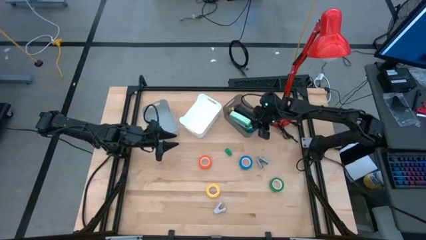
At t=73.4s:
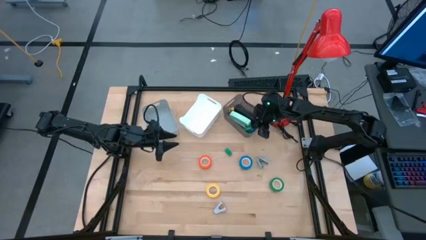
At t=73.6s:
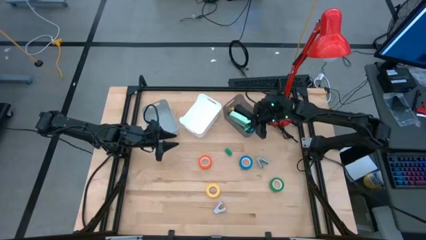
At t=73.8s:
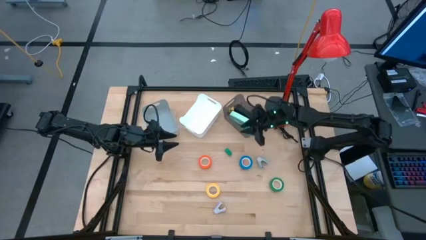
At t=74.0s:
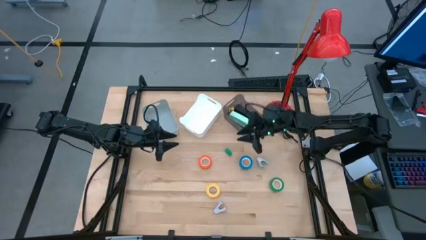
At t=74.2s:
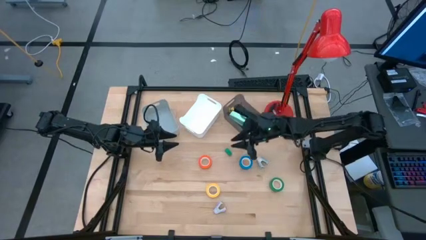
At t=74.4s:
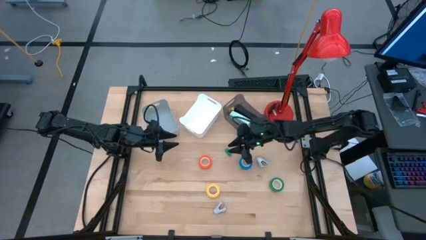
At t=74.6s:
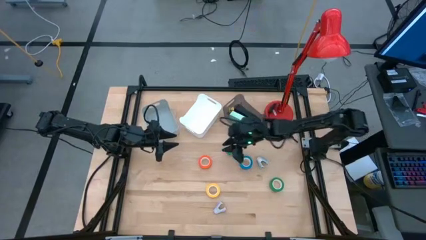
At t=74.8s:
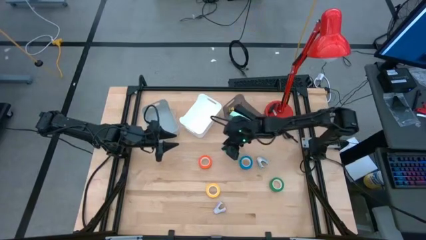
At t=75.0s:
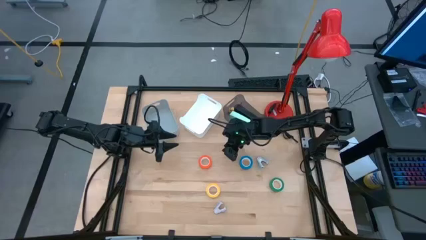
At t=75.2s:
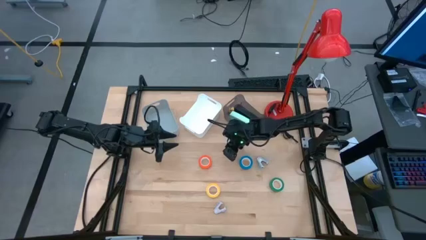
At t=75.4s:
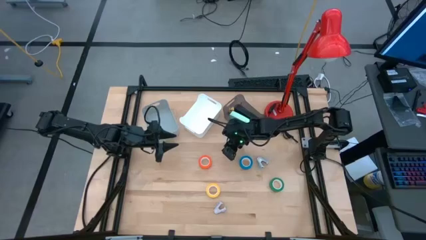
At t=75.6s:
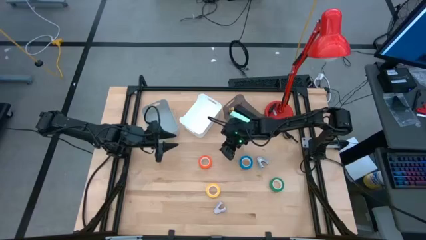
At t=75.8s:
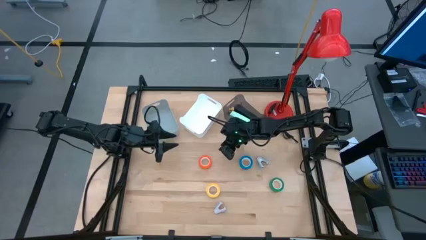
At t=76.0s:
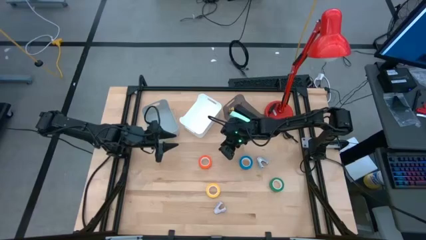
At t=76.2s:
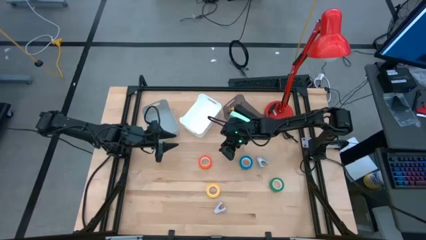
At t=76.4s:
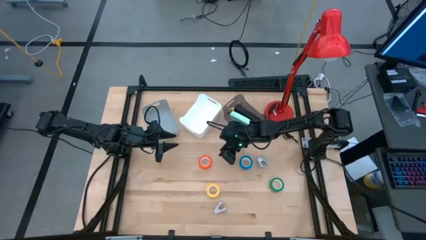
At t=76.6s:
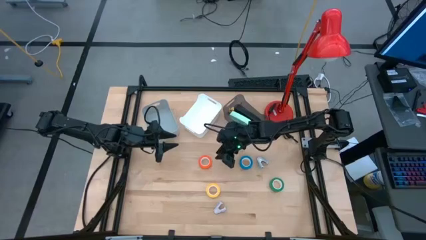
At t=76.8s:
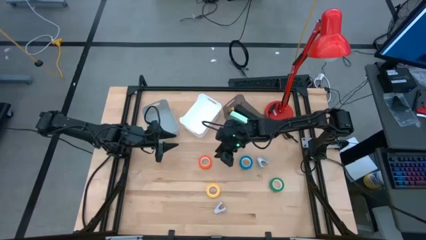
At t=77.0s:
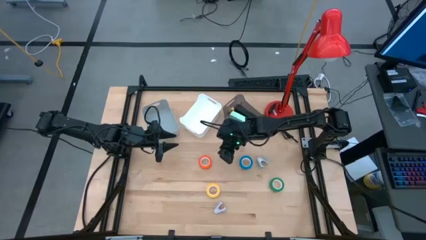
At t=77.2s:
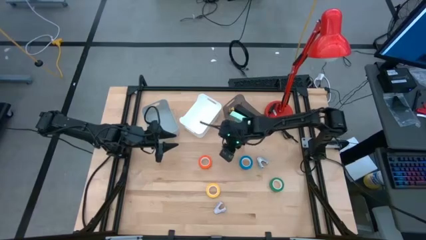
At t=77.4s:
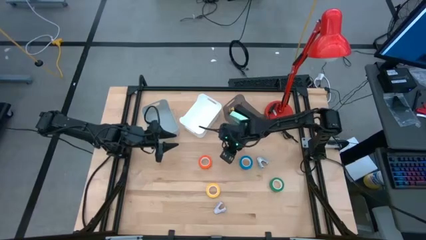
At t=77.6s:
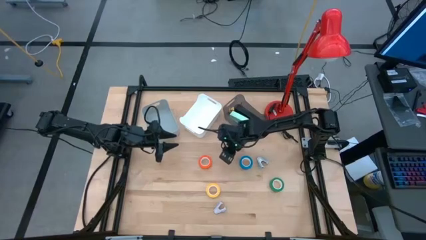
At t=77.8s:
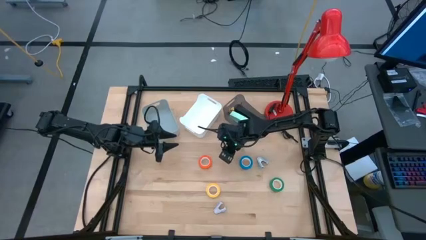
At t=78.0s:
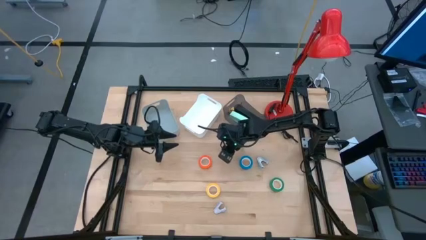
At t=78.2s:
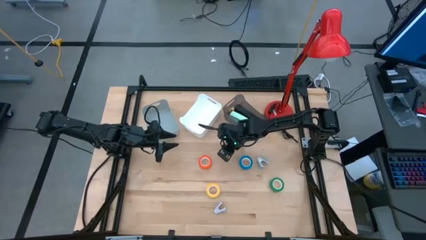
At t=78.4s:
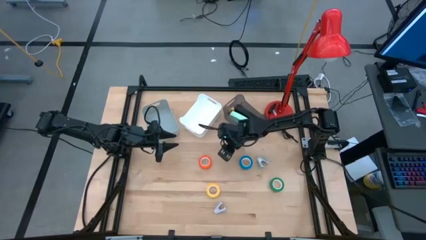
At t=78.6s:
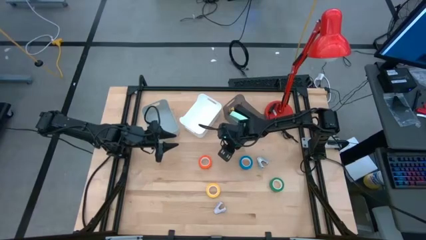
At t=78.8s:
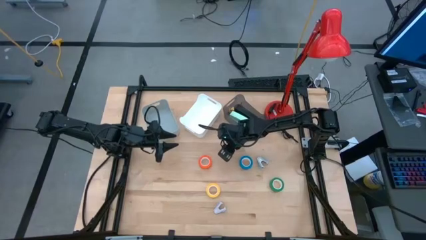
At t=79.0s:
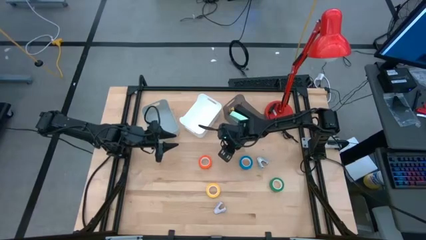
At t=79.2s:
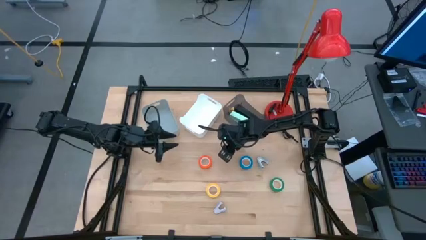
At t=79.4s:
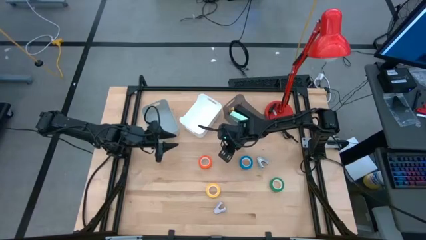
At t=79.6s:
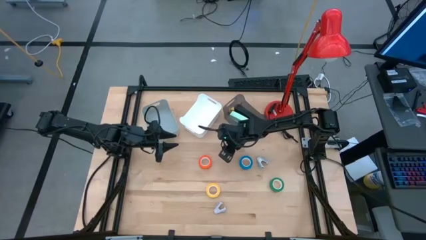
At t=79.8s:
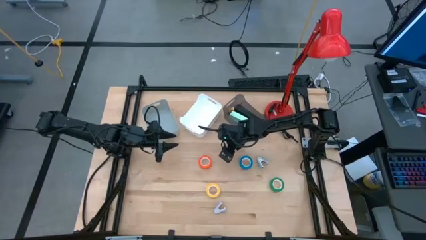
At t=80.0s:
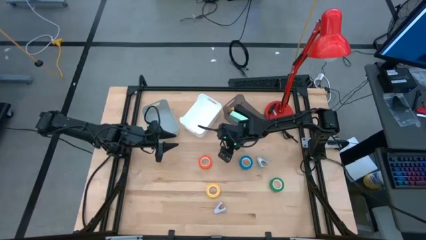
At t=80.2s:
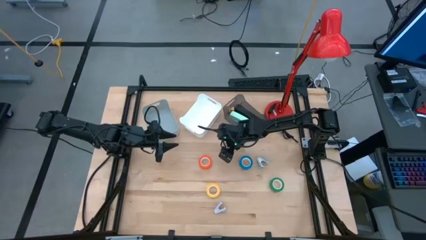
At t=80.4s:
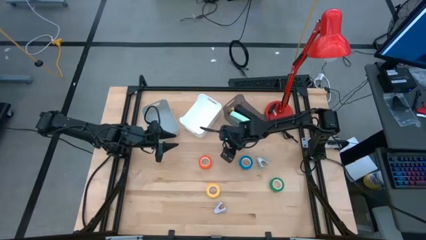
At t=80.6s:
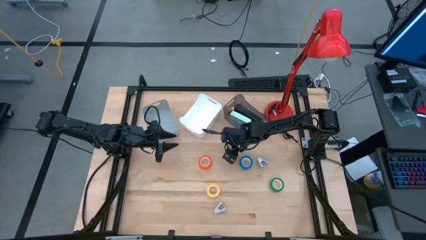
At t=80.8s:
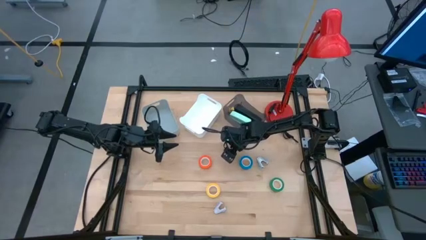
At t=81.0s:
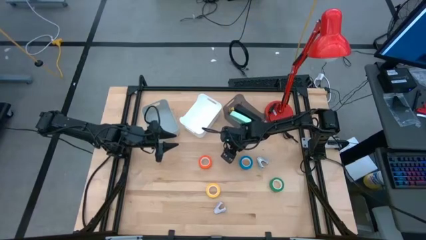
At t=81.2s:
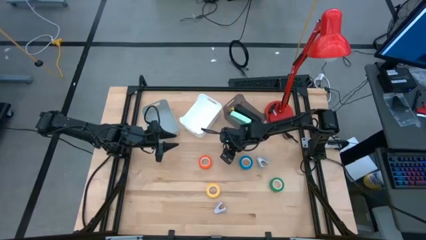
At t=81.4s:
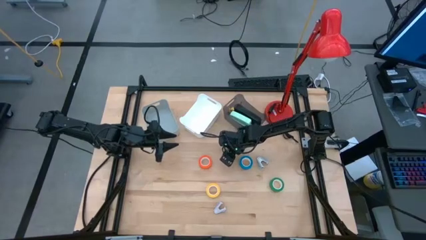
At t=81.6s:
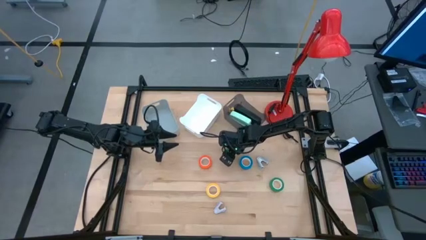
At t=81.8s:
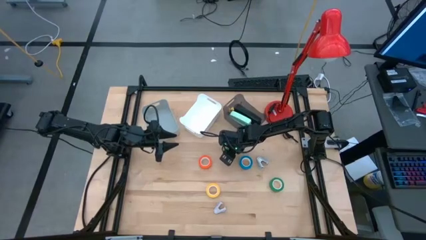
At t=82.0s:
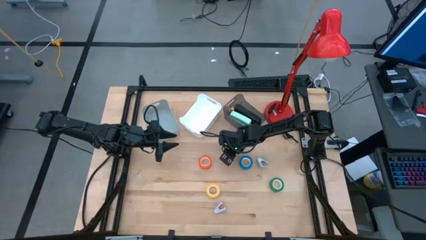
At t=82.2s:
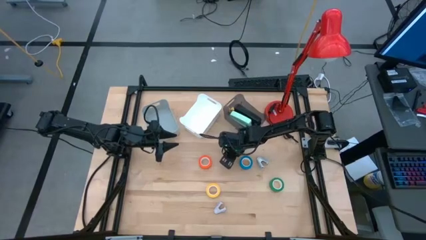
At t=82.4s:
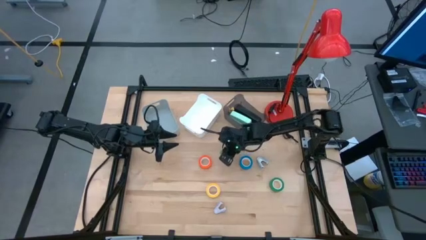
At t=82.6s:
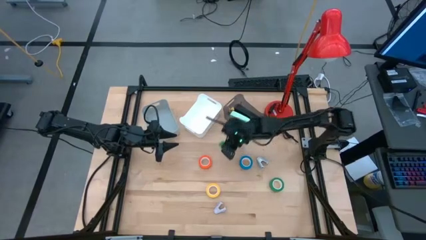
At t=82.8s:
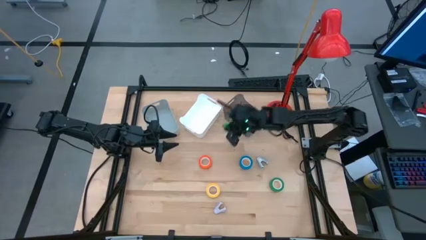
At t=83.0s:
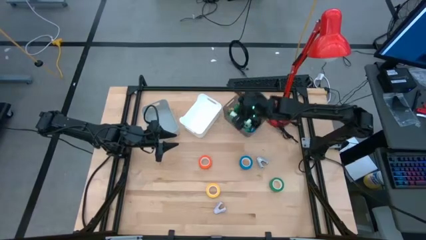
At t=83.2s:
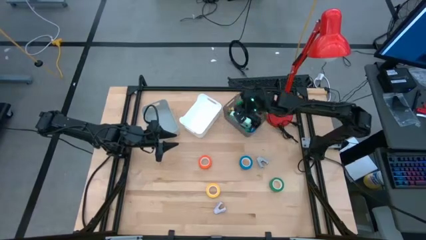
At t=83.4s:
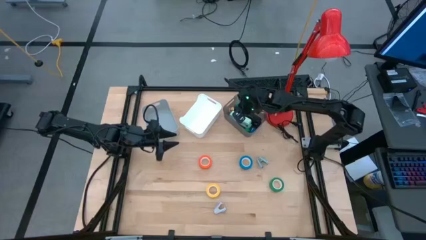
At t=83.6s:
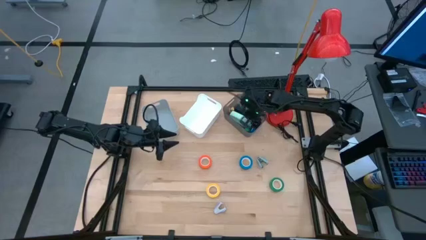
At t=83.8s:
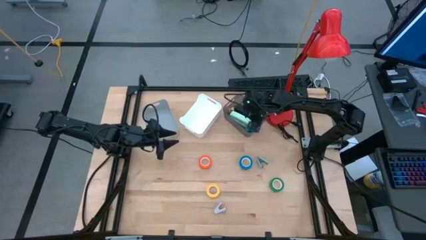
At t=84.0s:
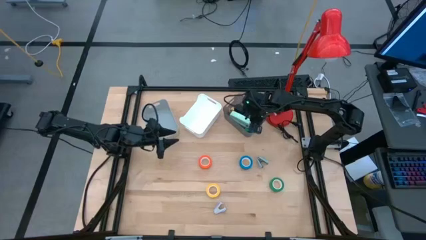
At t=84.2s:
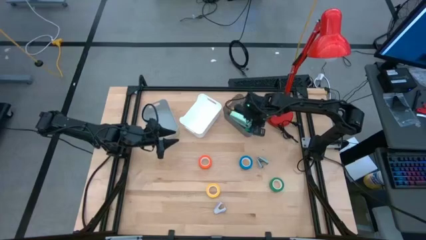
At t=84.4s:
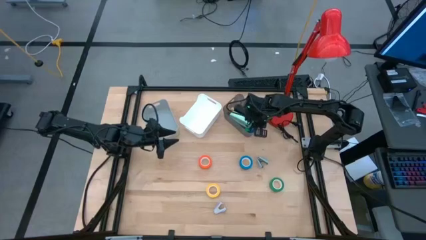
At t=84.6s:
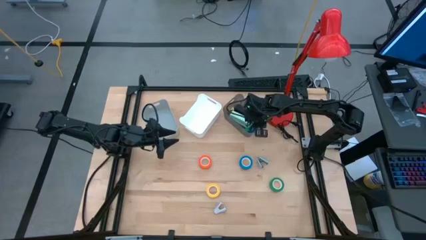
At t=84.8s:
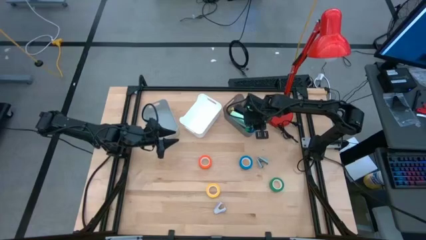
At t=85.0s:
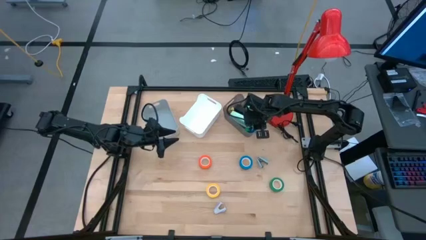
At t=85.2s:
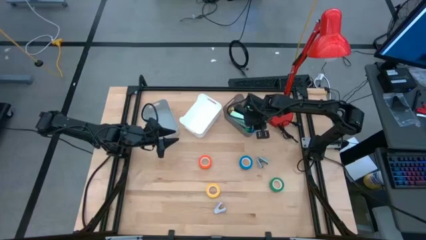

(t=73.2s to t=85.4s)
Task: Pick and place Stapler, Stapler remover, tape
Put the green stapler into the black bin
